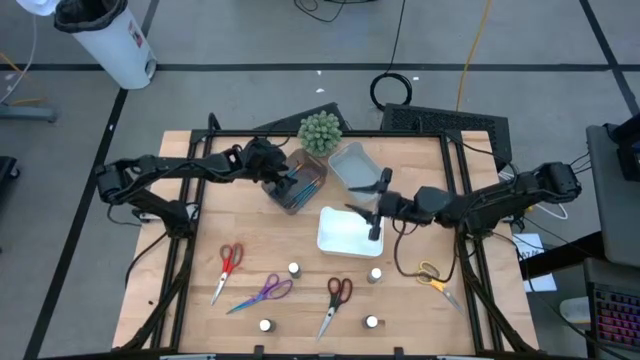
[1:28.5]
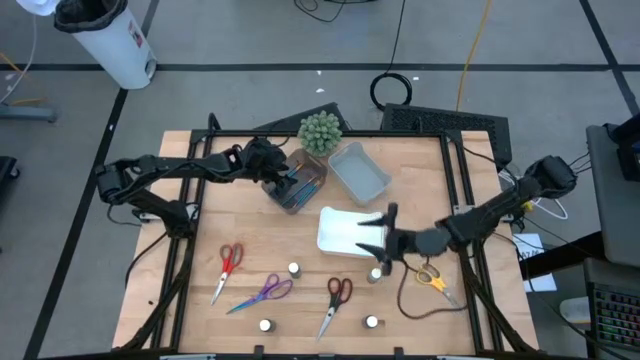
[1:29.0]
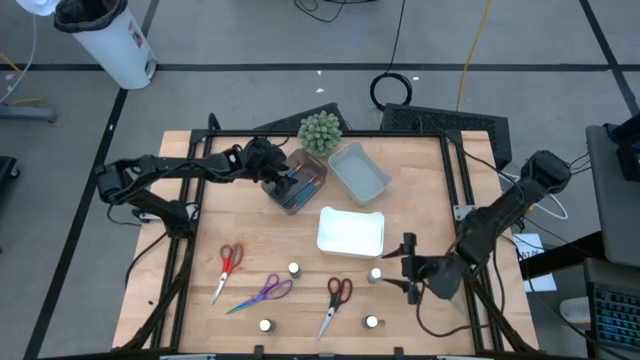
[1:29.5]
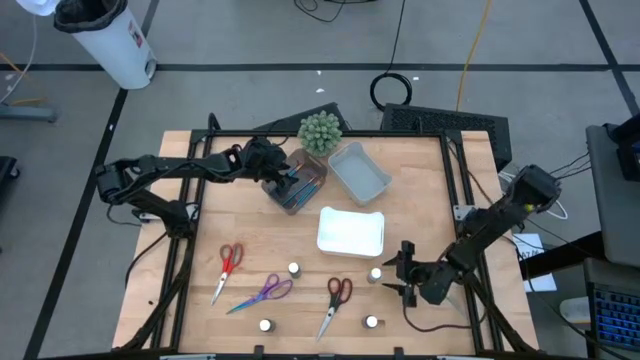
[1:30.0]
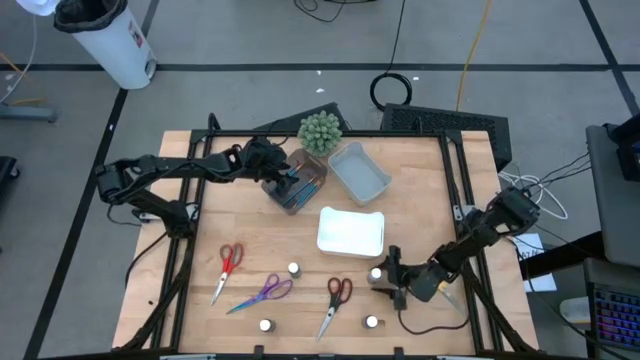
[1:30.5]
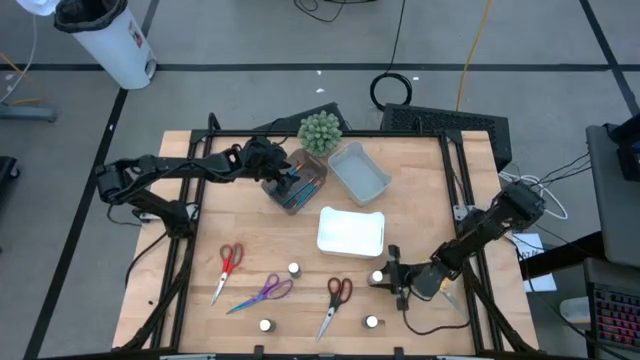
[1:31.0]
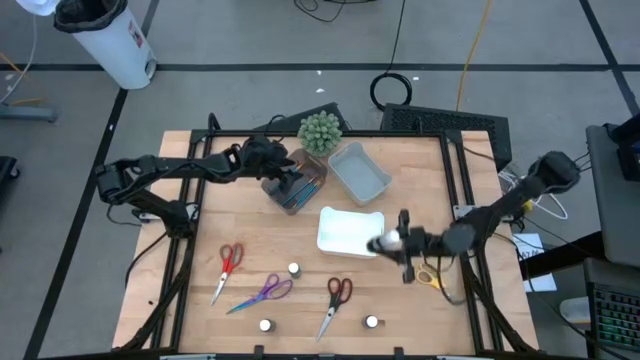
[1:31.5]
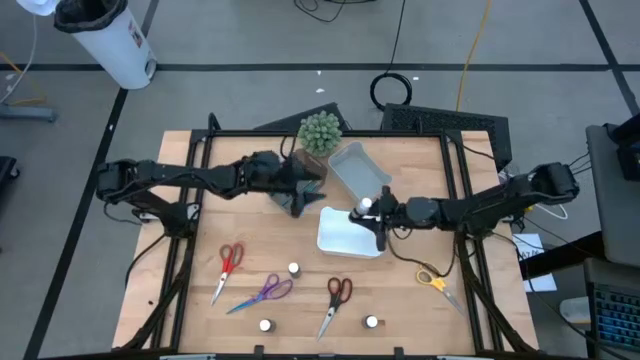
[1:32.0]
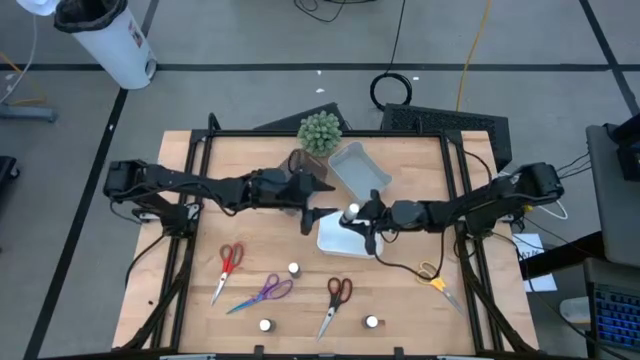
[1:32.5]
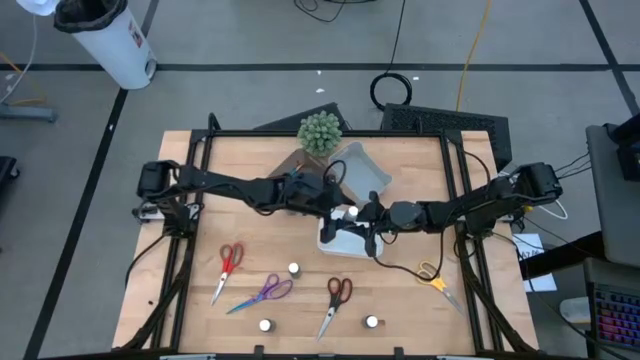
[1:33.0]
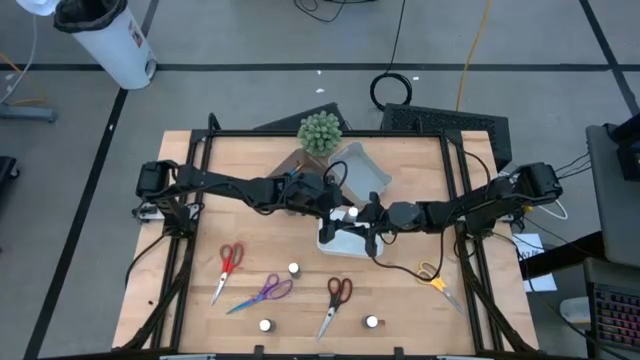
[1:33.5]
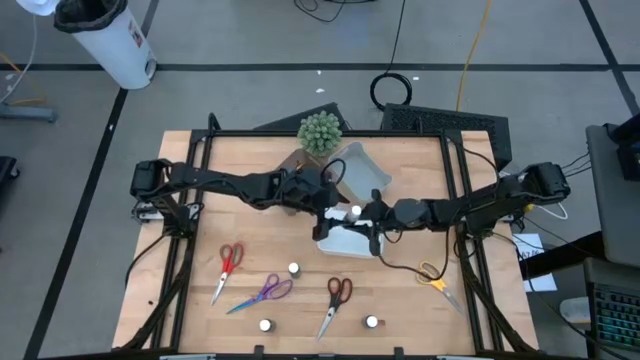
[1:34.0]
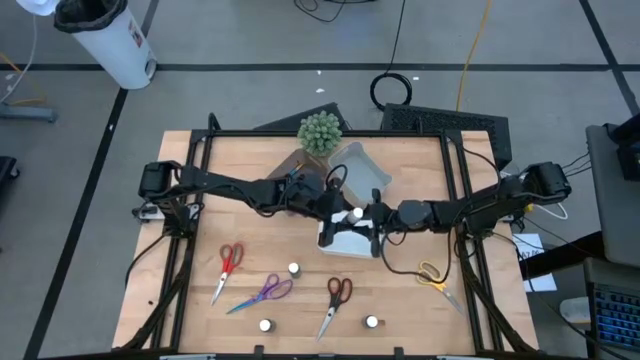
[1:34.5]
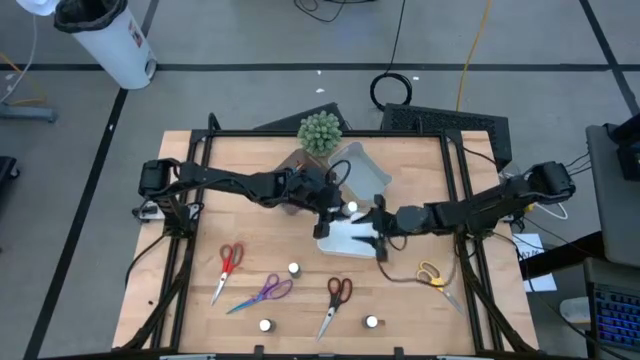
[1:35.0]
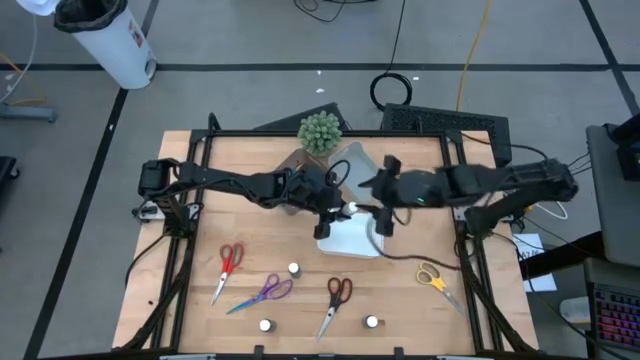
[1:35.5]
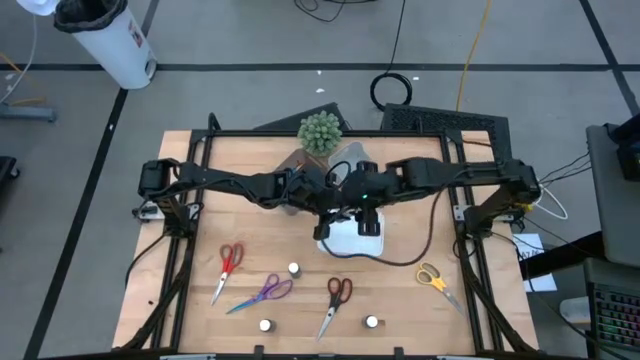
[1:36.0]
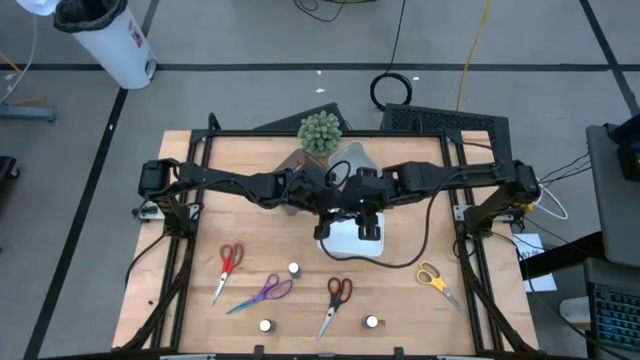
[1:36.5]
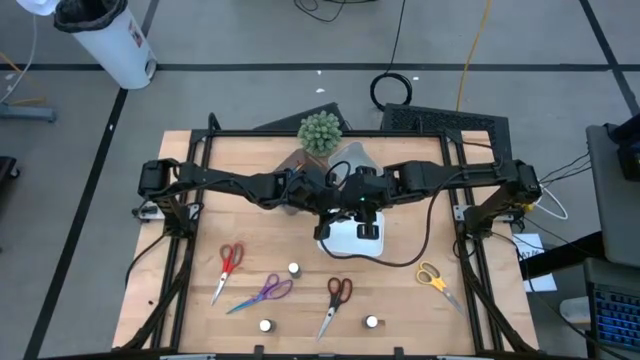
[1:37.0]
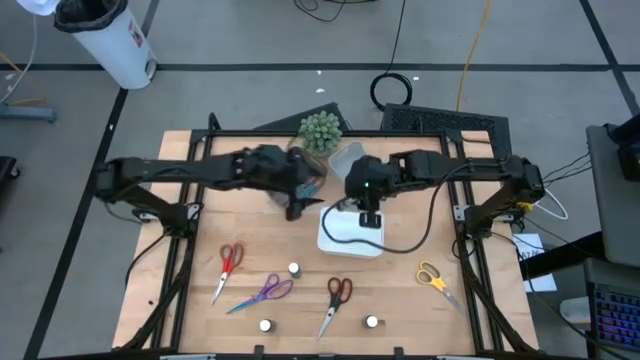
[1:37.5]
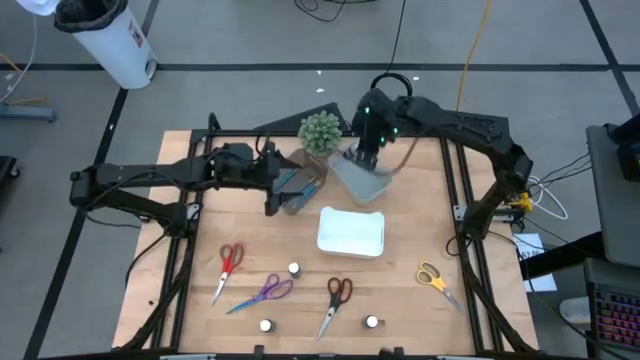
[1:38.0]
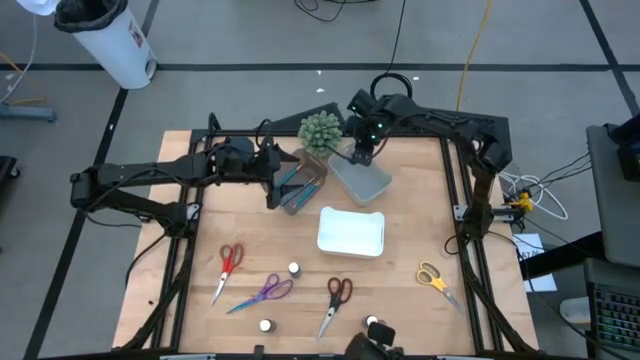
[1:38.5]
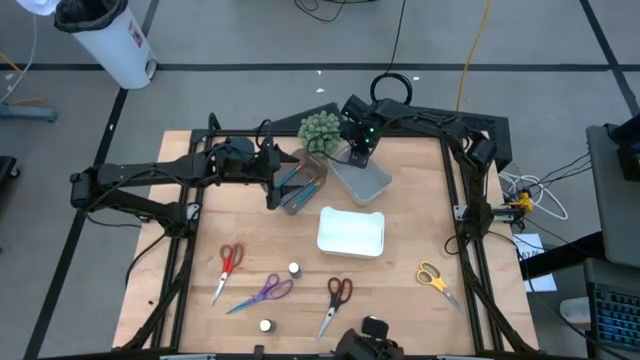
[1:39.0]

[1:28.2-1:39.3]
Task: Pick & Place Paint Supplies
Put the white paint bottle into the gray bin

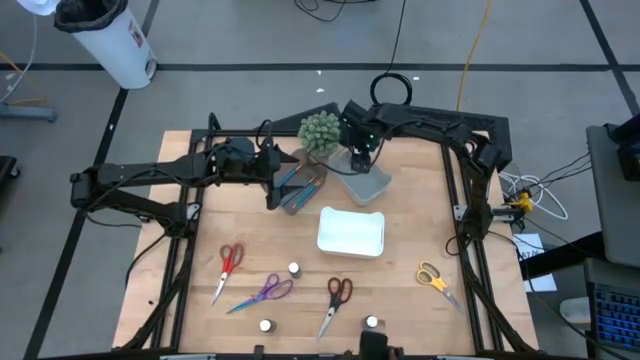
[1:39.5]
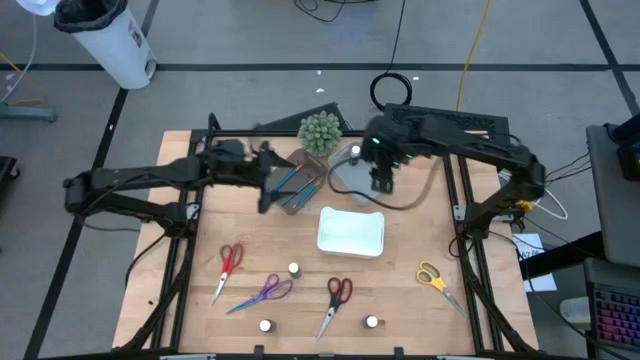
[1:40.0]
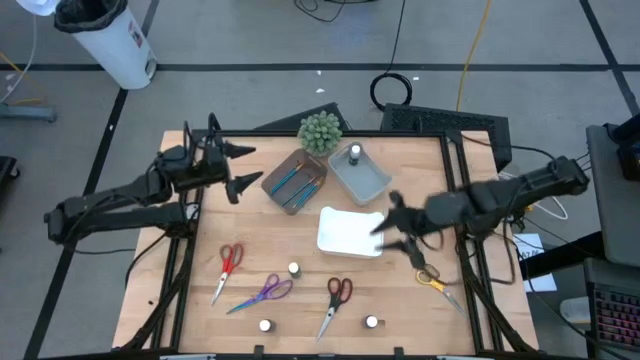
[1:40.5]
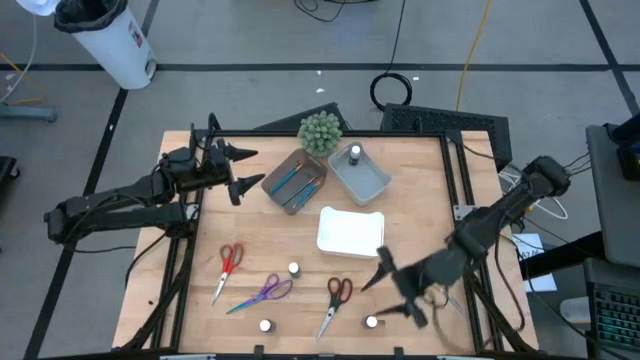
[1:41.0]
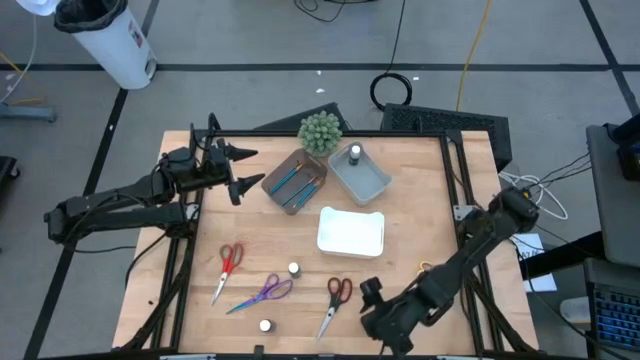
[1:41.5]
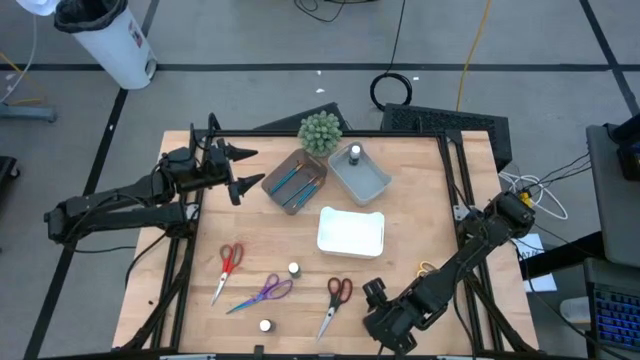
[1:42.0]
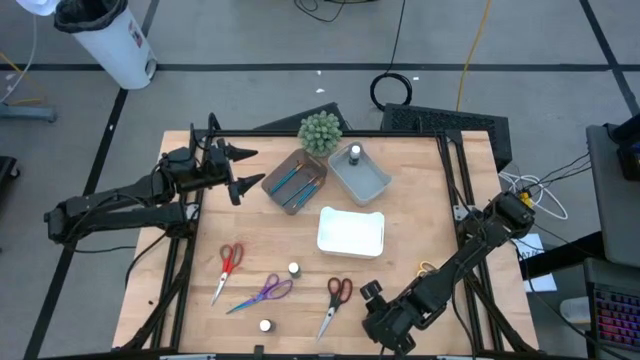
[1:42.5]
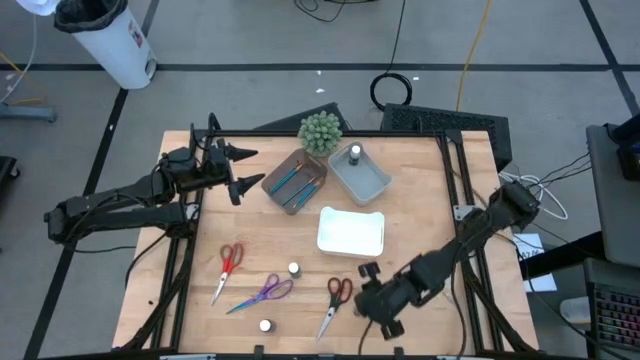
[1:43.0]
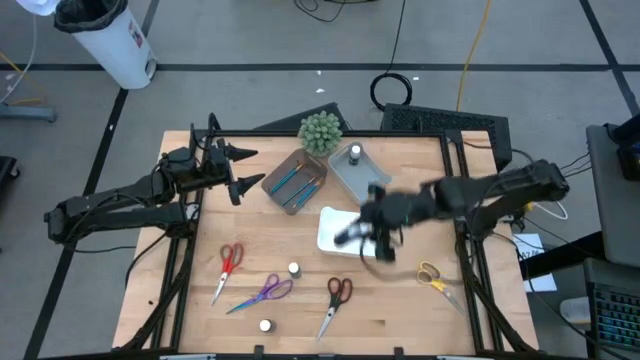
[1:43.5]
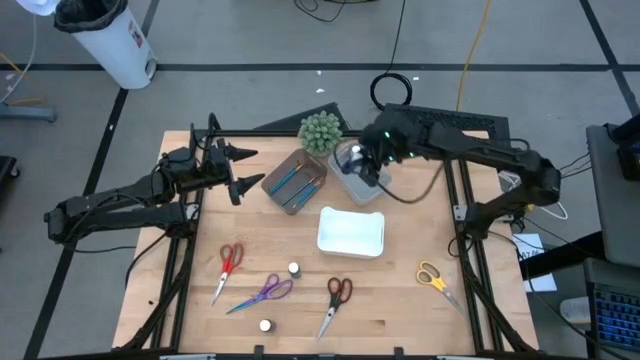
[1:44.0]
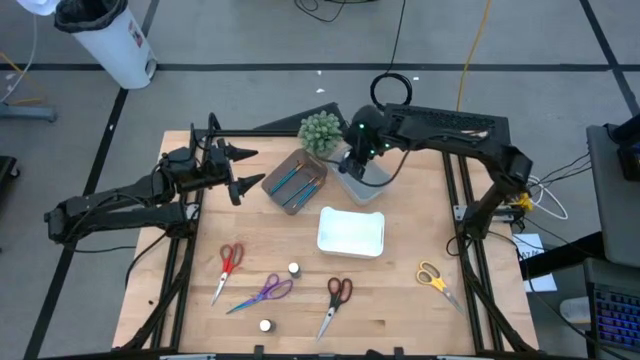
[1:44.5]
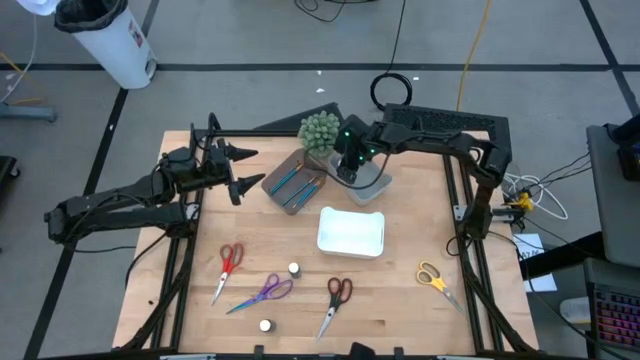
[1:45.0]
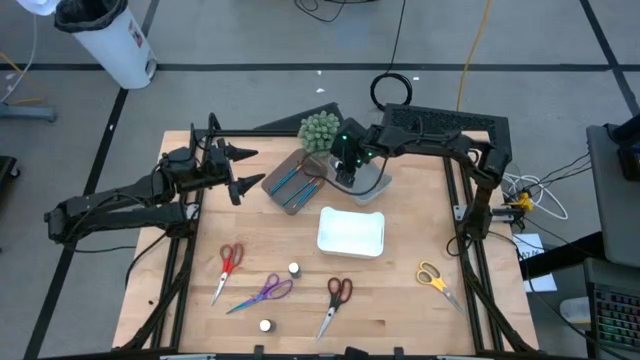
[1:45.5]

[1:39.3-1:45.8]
Put the blue paint bottle into the gray bin

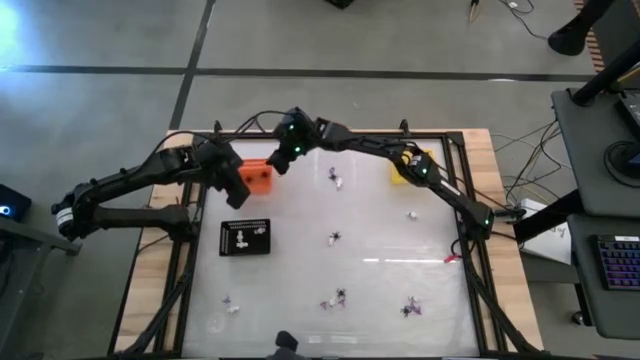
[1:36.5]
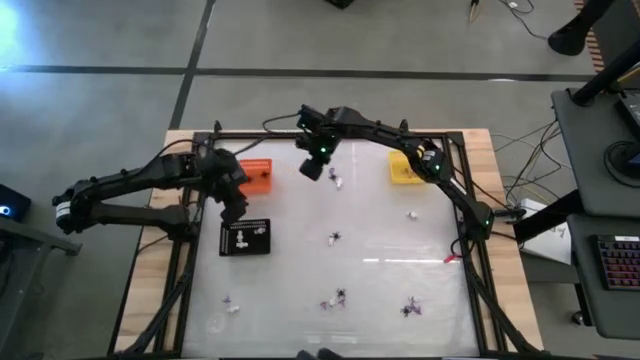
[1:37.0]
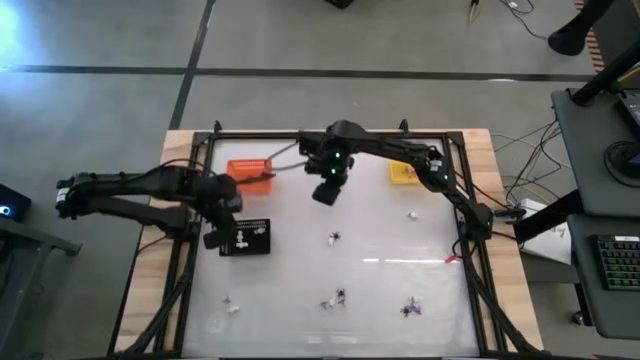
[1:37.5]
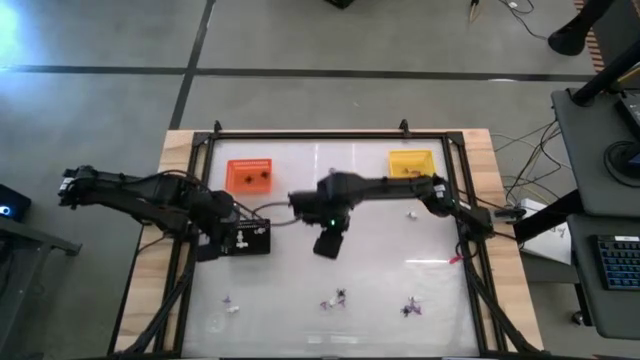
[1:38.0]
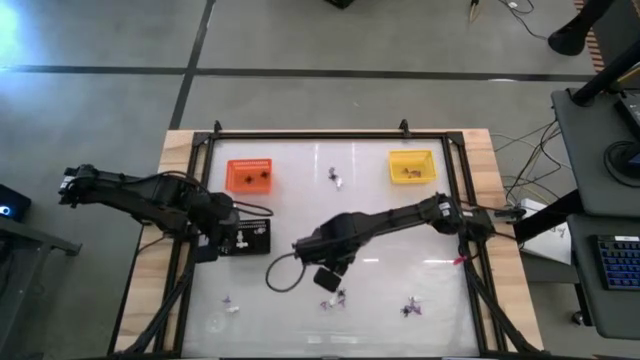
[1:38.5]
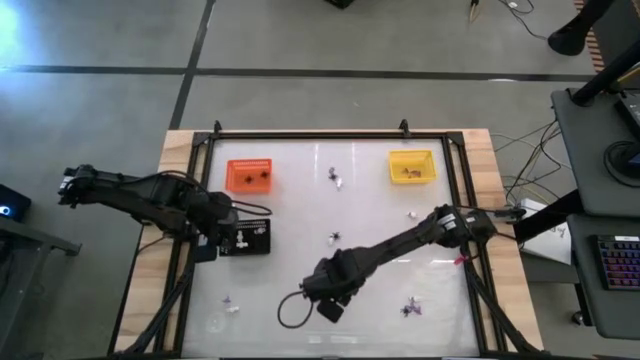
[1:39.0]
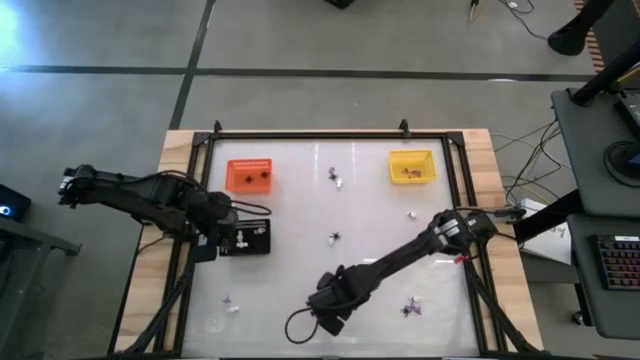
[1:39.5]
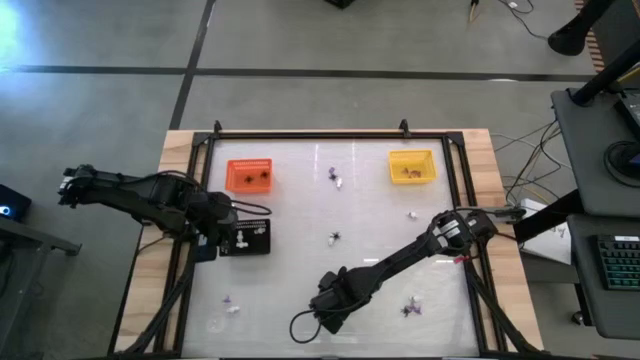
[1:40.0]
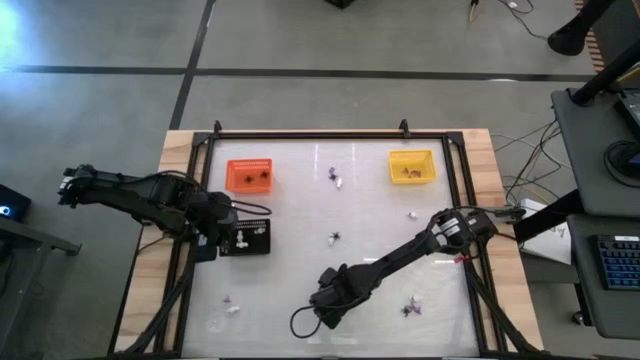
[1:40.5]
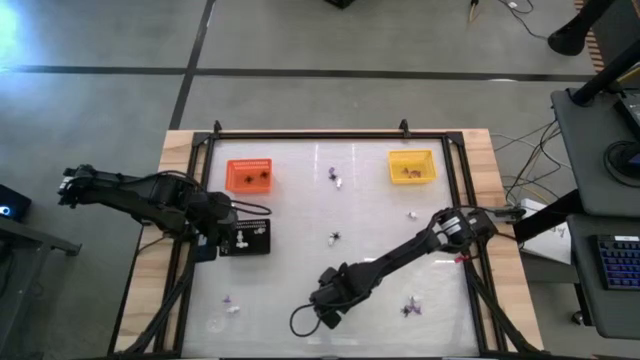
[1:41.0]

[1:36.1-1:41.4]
Task: Sort Halloween decoration
Put the purple witch hat toy into the yellow bin
